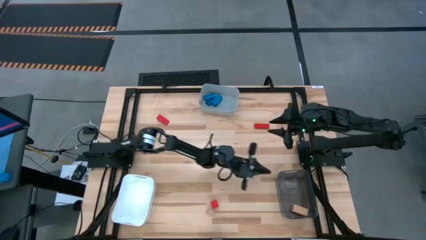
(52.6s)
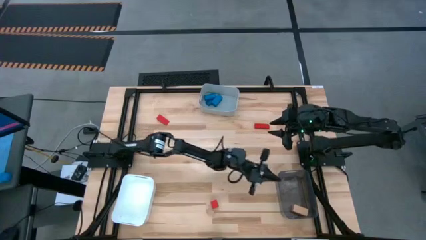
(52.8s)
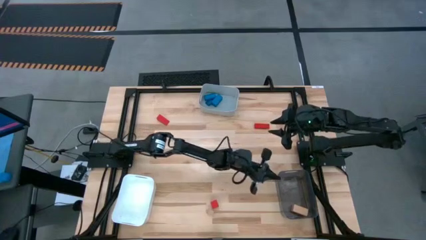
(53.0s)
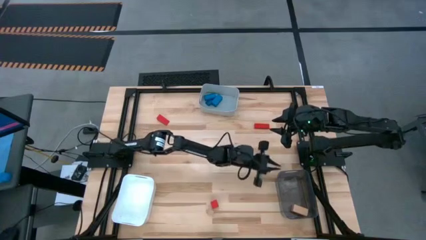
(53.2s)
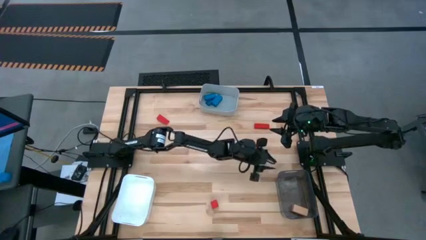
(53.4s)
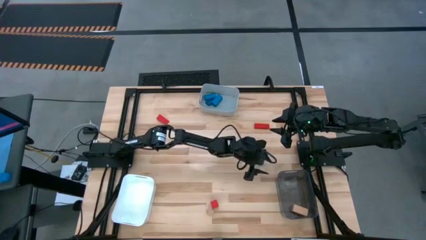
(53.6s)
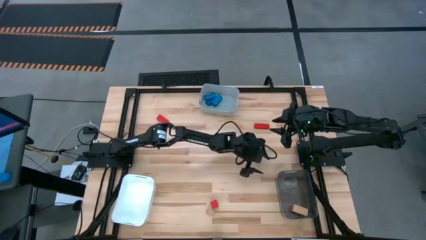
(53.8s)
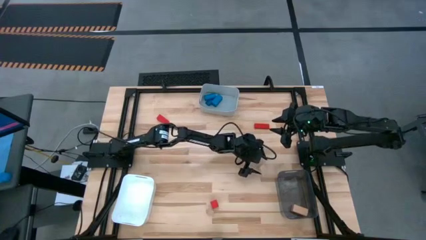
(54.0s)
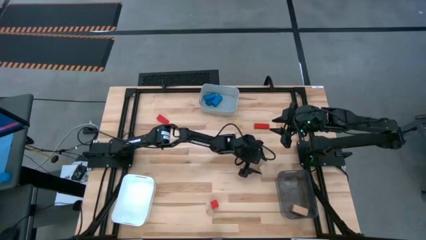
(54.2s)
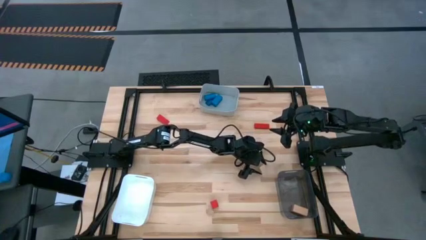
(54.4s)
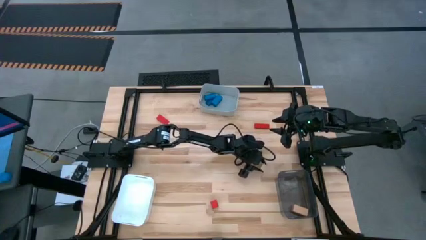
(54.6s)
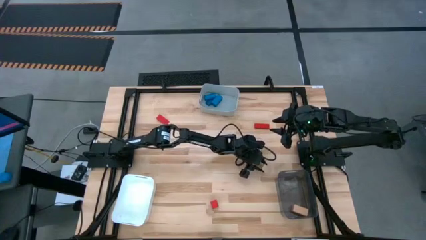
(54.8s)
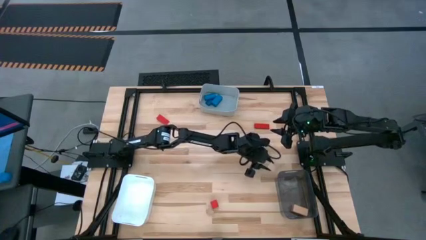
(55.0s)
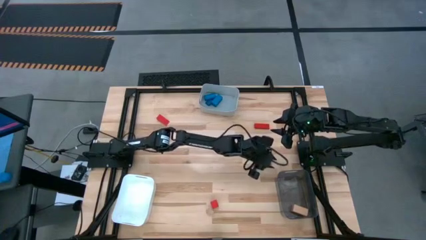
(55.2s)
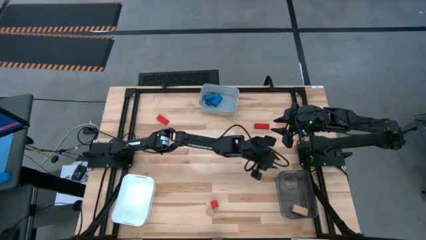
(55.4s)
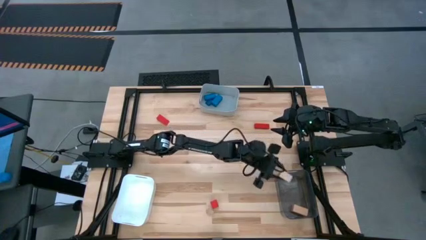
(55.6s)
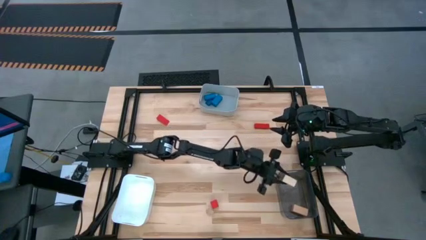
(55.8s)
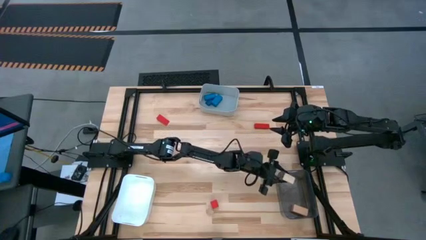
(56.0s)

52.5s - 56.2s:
Task: Sort & place blocks by color
Put the brown triangle block into the transparent black bin

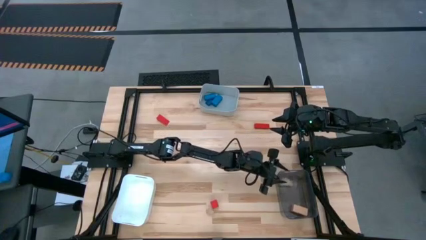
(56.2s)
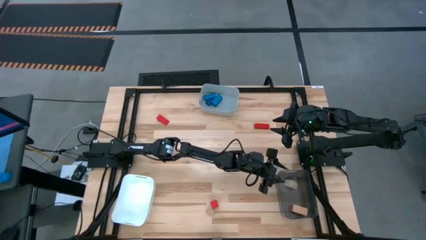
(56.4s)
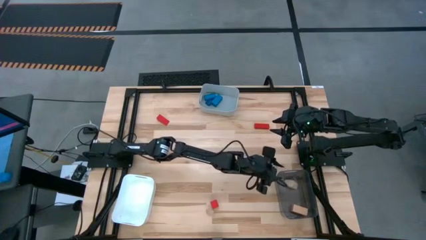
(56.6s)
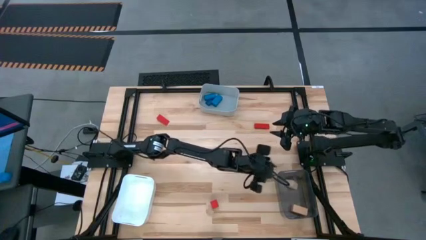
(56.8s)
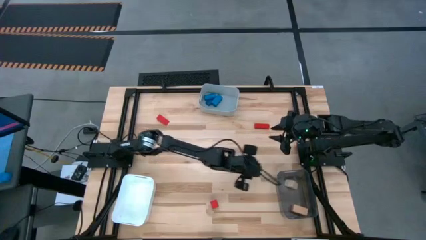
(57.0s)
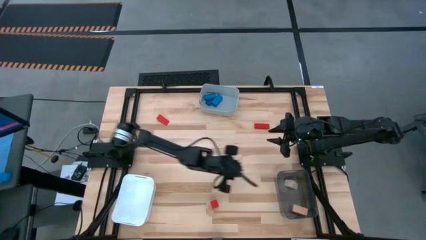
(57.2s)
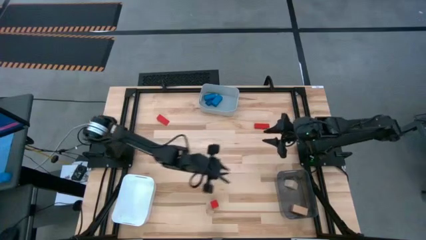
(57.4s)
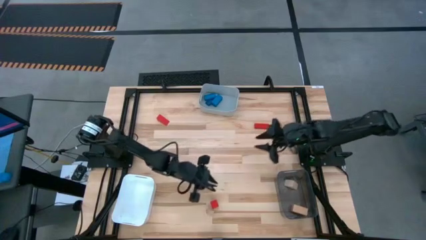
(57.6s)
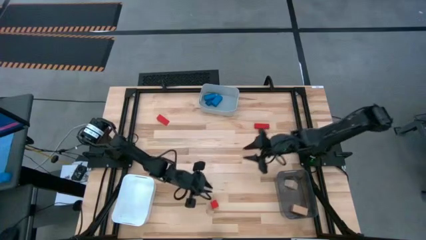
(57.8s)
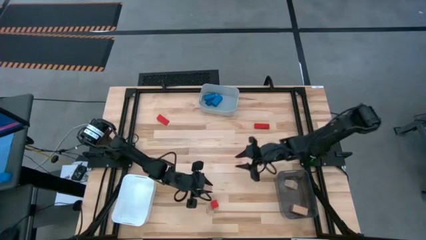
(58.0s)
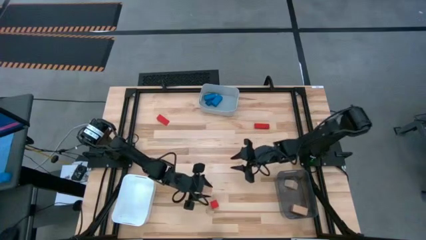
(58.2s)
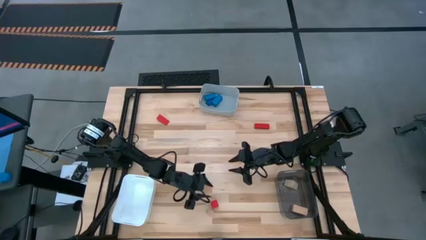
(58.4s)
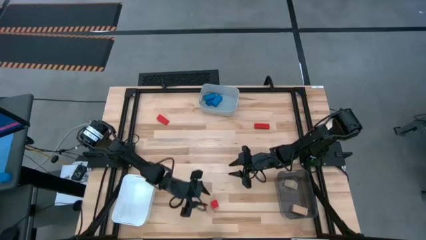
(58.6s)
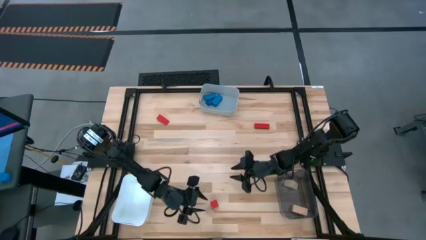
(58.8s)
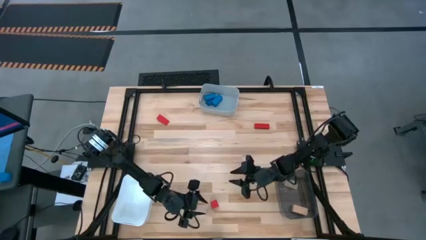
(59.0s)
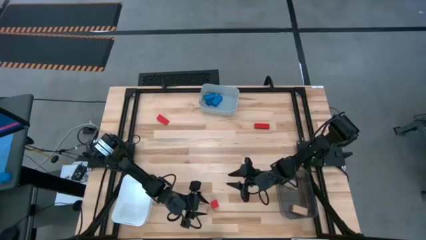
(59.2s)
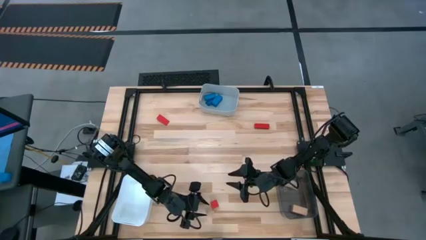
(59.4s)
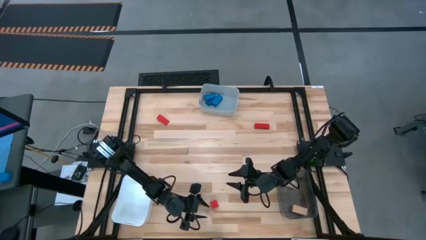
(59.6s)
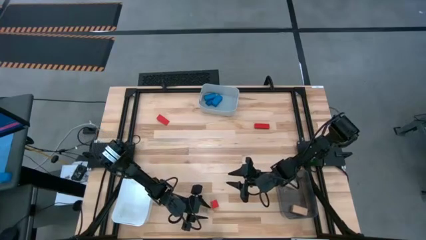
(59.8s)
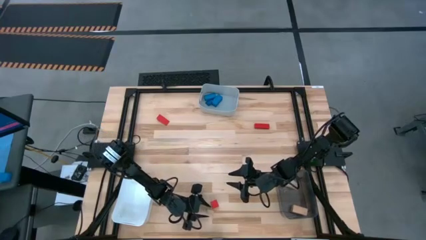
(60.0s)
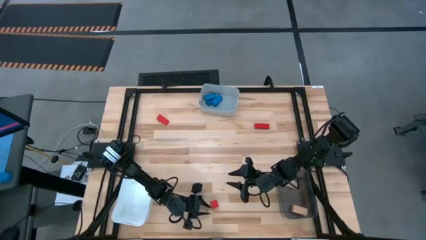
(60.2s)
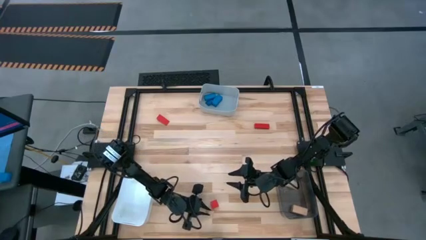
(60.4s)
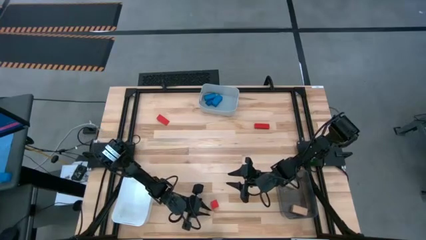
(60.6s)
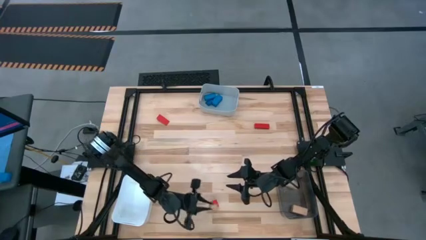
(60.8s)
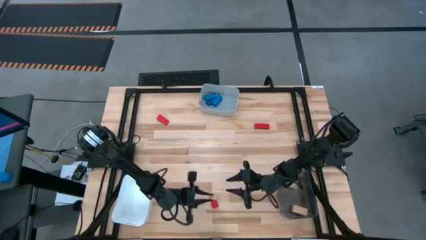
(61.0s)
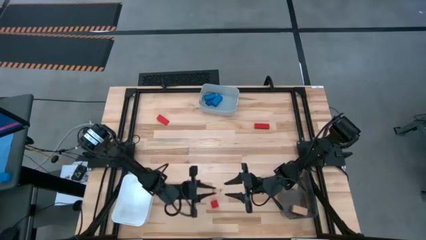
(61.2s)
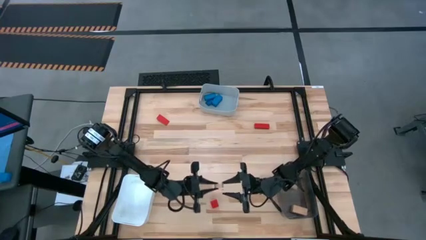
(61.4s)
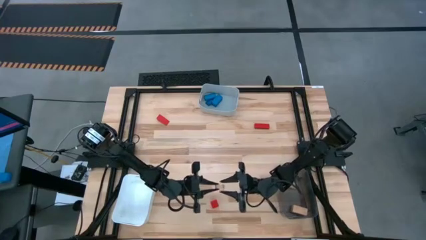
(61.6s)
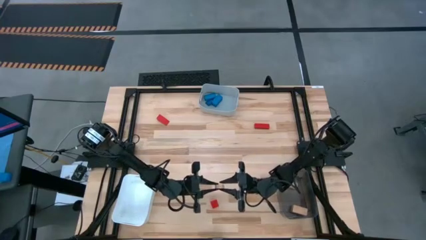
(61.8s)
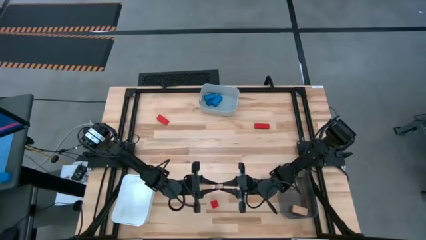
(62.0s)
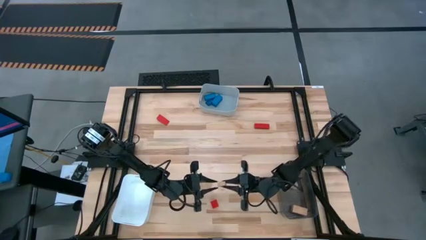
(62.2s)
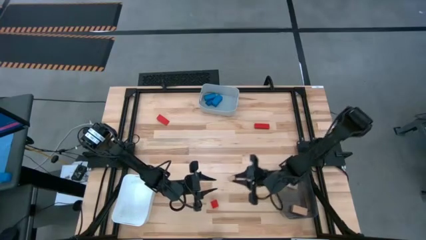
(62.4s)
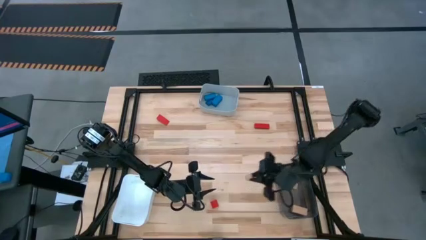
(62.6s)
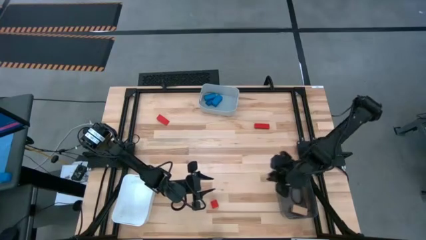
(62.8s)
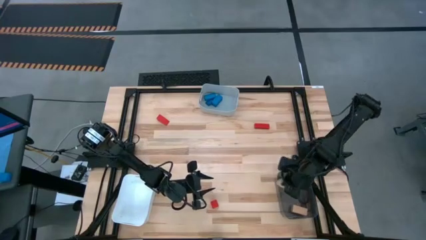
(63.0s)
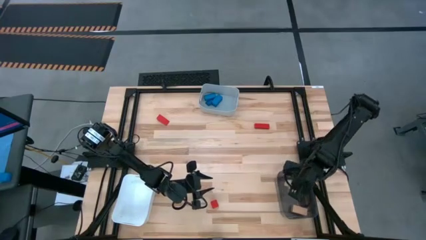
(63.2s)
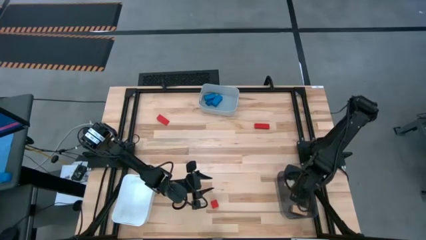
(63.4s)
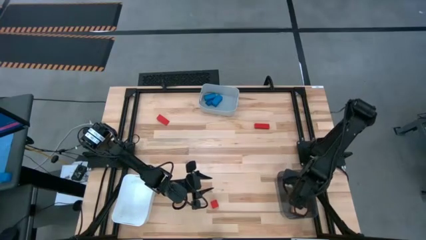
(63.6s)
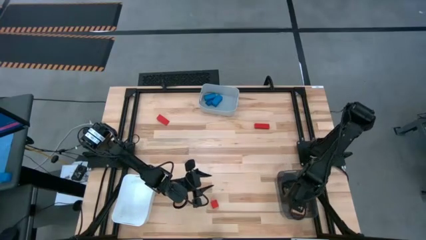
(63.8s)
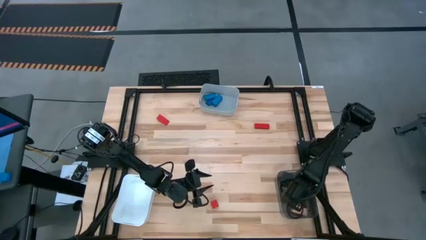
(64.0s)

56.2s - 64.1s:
Put the brown square block into the transparent black bin
